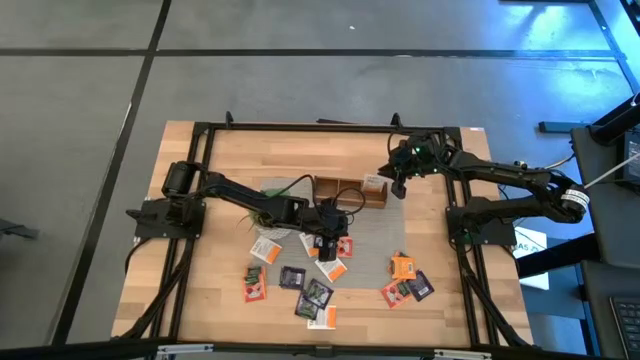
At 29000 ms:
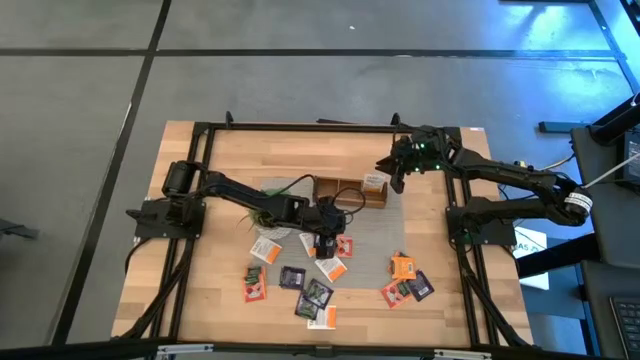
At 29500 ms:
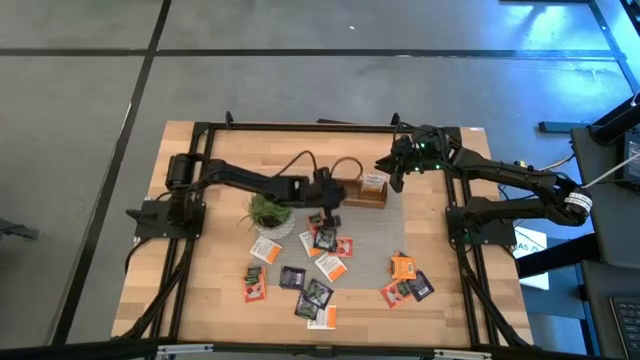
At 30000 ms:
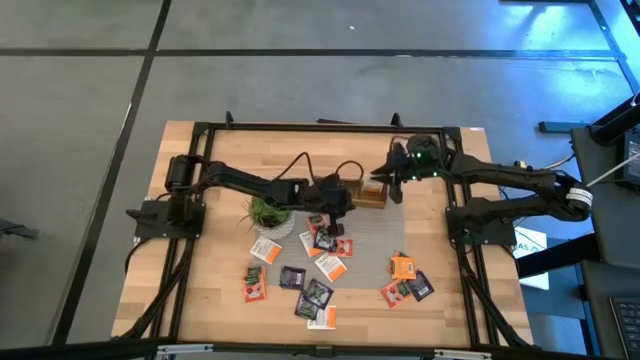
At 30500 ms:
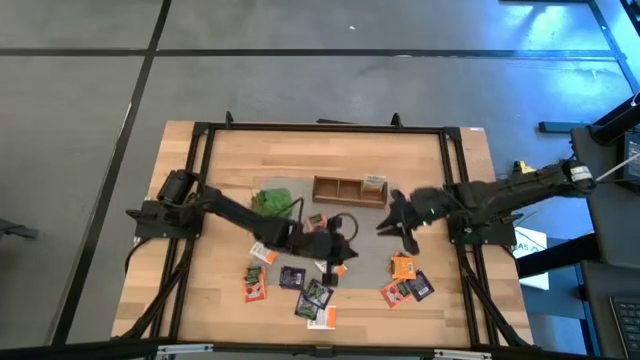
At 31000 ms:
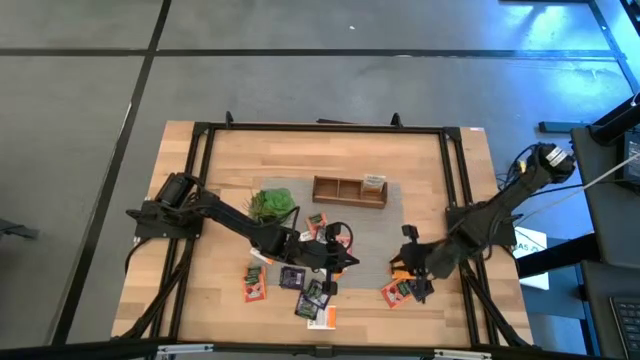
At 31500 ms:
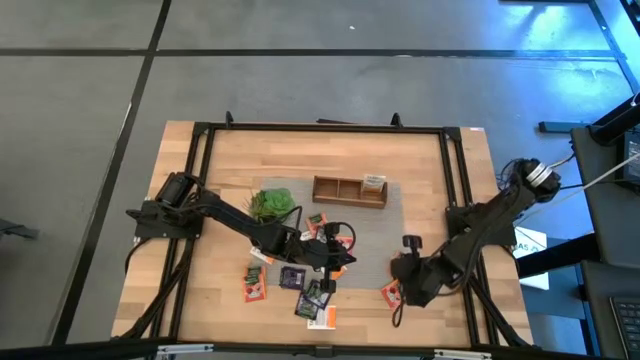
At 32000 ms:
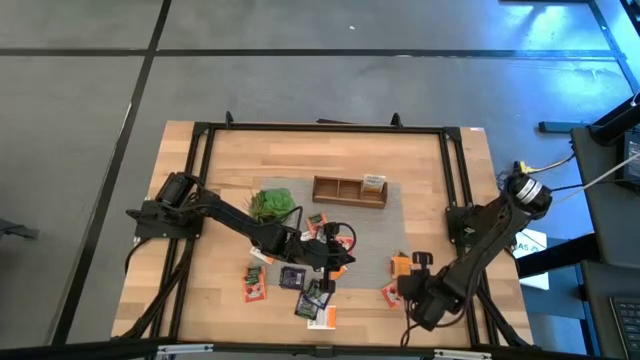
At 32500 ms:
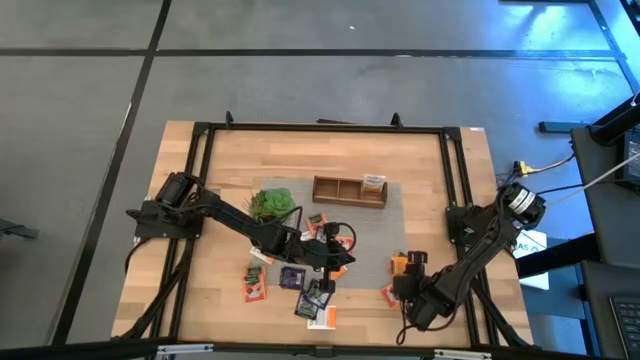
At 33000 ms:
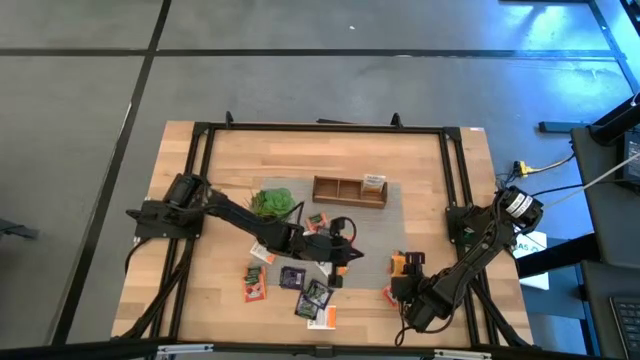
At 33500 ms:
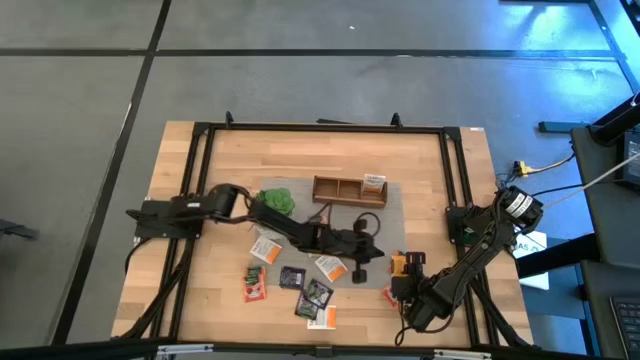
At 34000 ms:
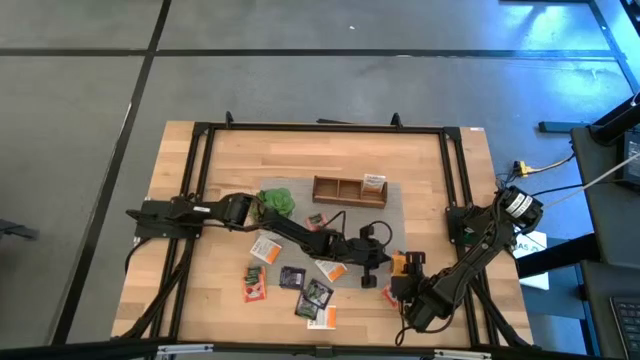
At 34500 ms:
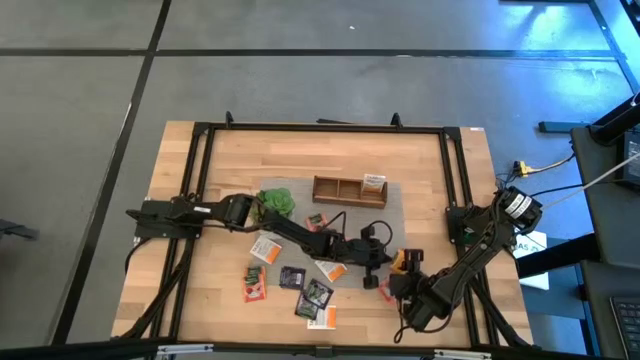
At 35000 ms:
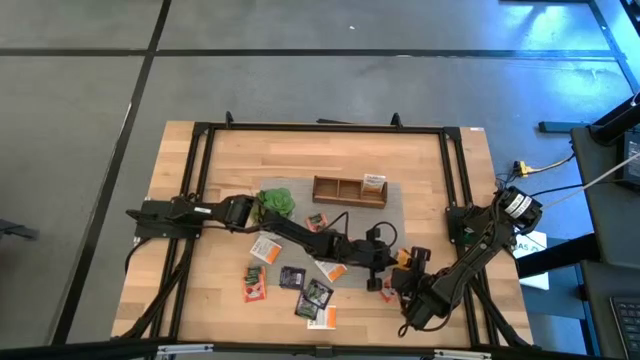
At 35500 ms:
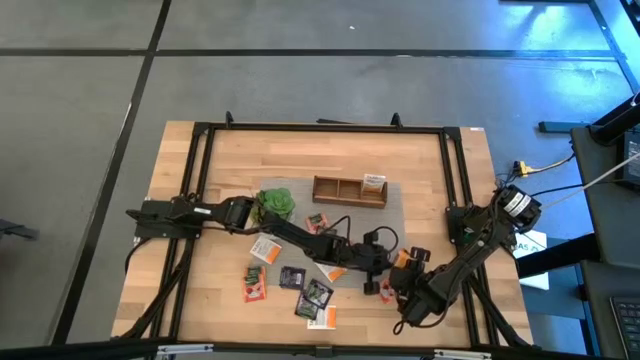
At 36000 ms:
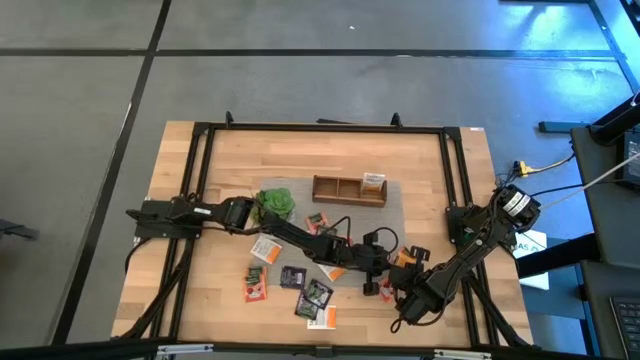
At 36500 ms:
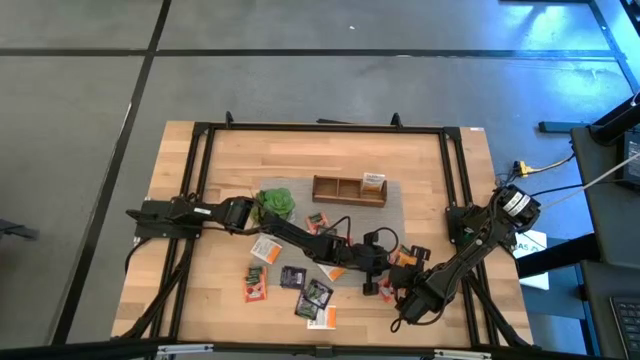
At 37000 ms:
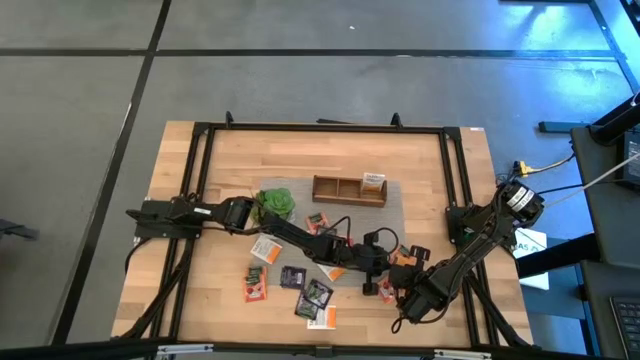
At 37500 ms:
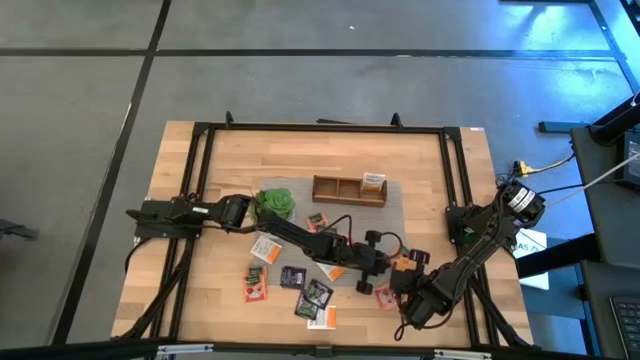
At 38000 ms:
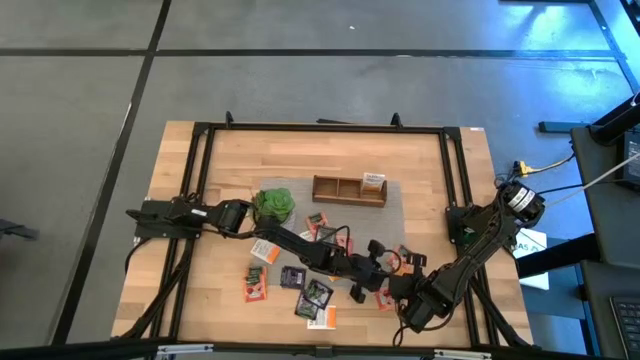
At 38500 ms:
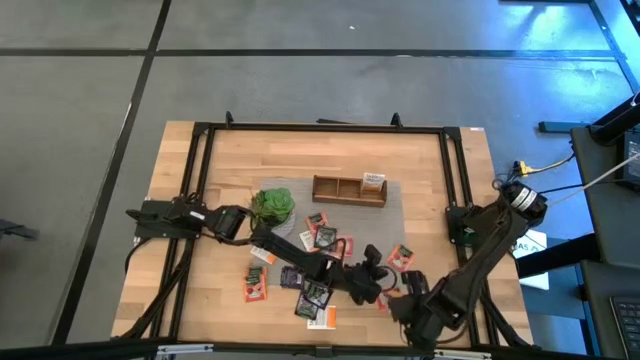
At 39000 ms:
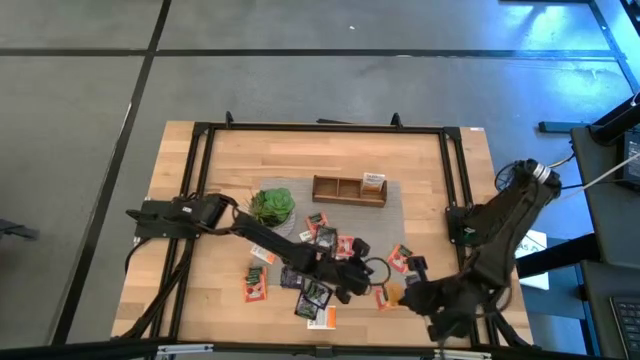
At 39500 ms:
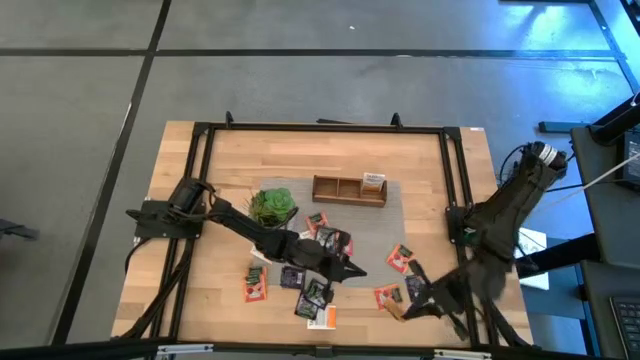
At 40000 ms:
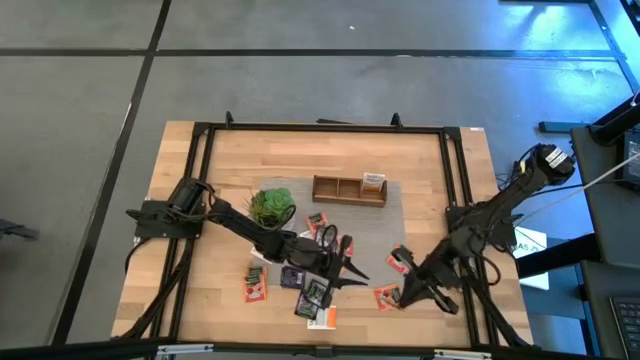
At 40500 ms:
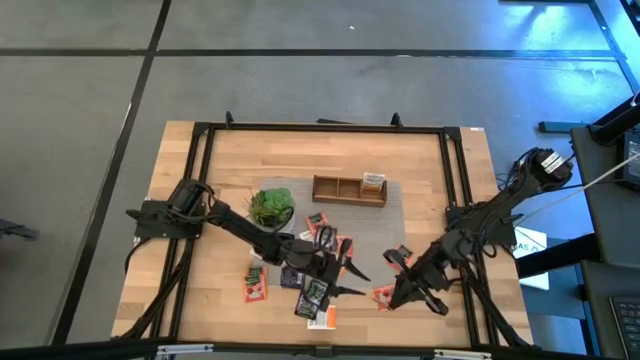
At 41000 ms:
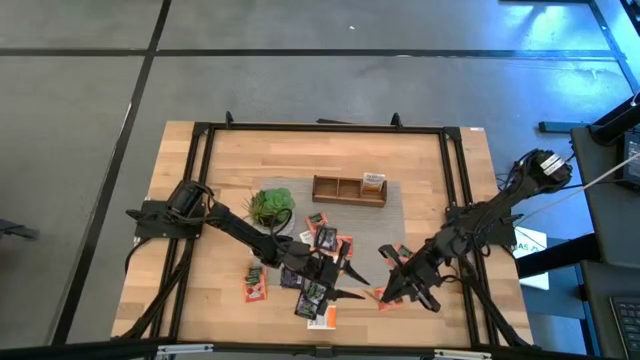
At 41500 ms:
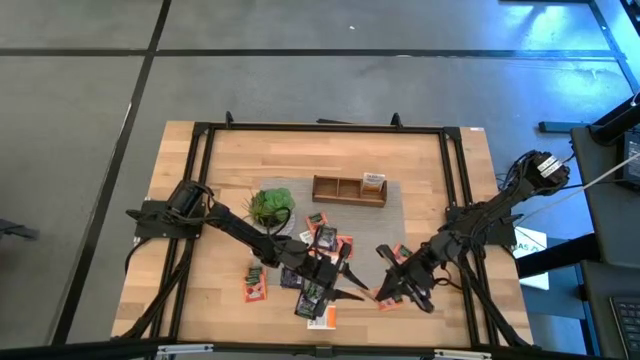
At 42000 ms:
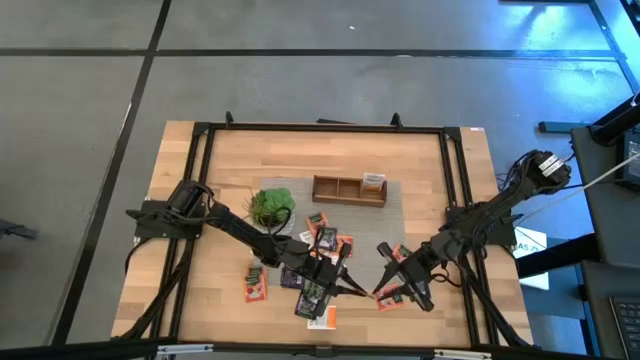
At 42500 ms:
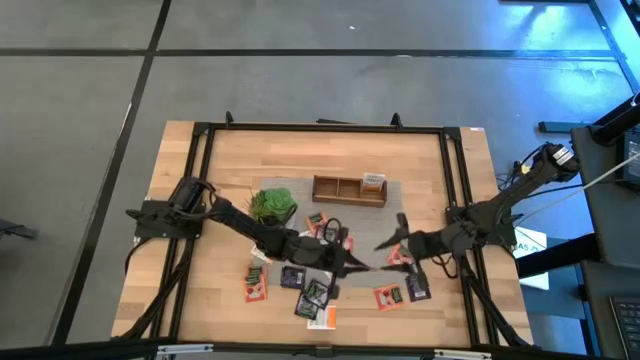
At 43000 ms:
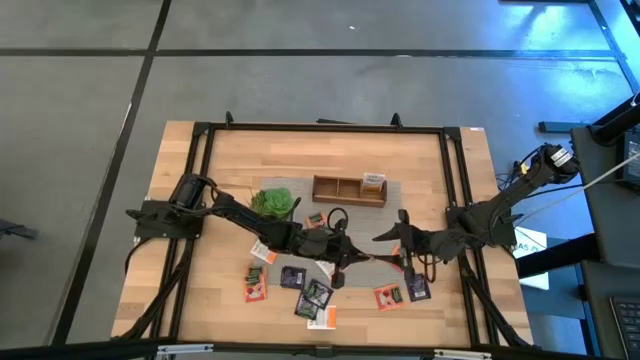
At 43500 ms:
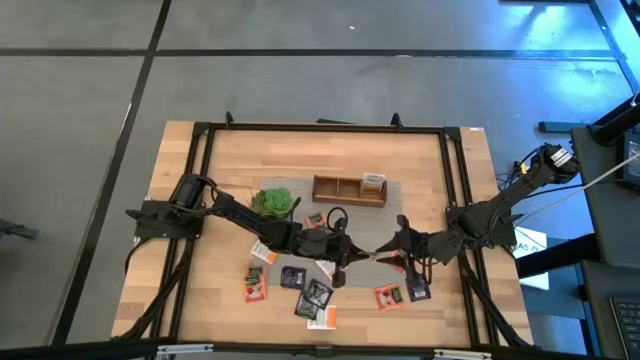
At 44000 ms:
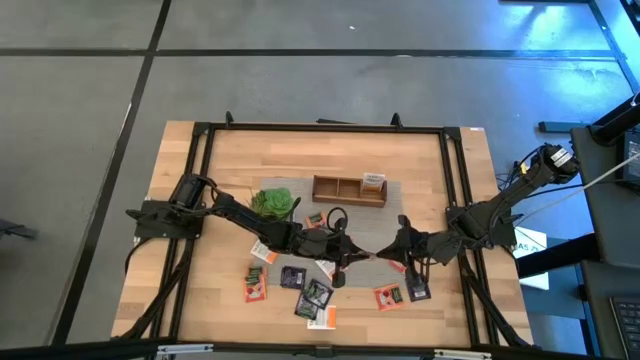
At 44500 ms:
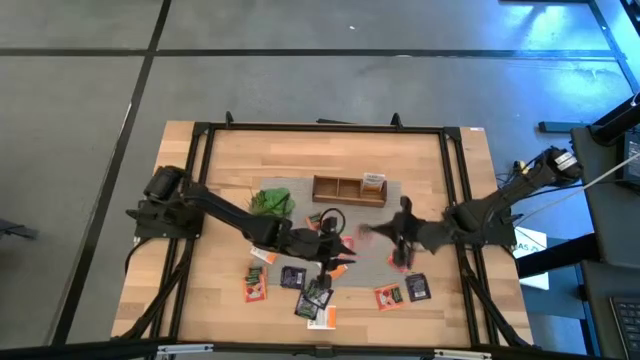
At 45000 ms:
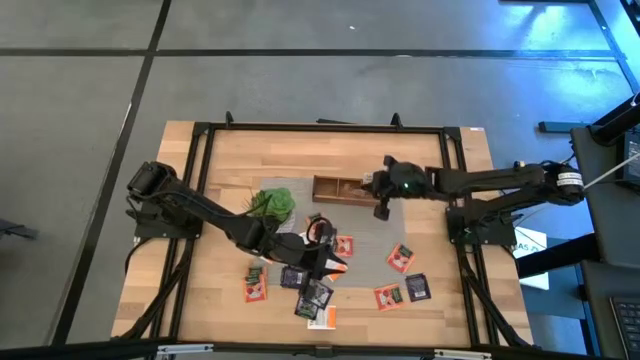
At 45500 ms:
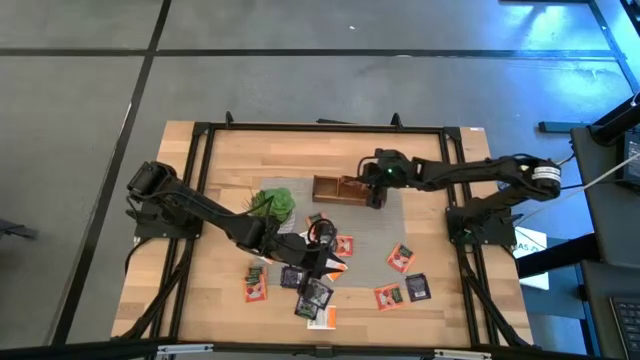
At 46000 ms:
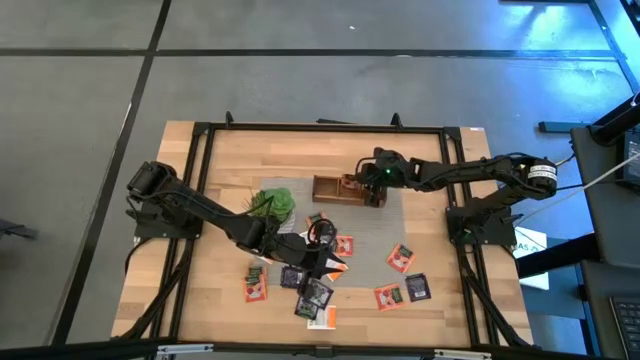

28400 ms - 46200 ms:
Task: Pick & Place Tea
Put the orange tea bag into the middle section of the wooden organizer

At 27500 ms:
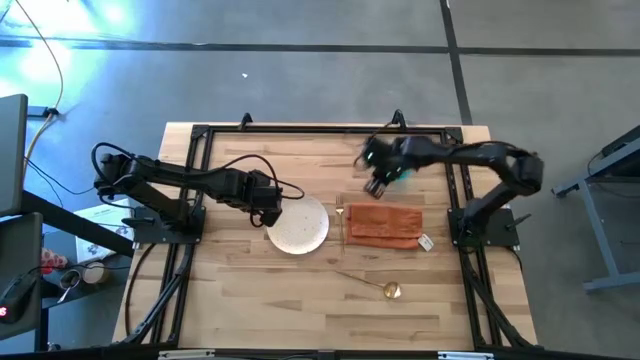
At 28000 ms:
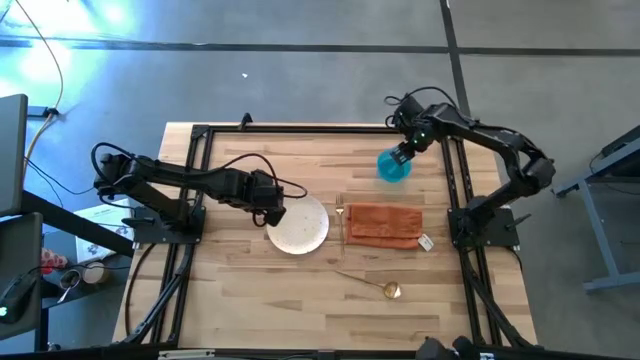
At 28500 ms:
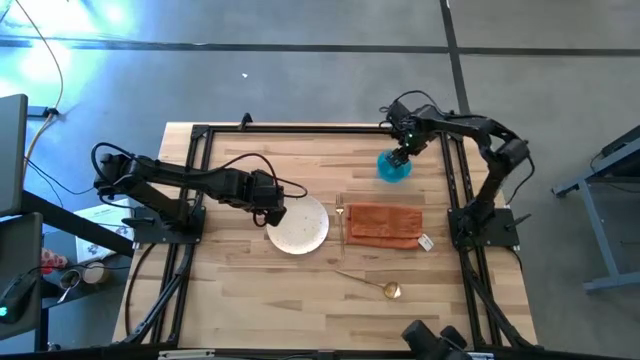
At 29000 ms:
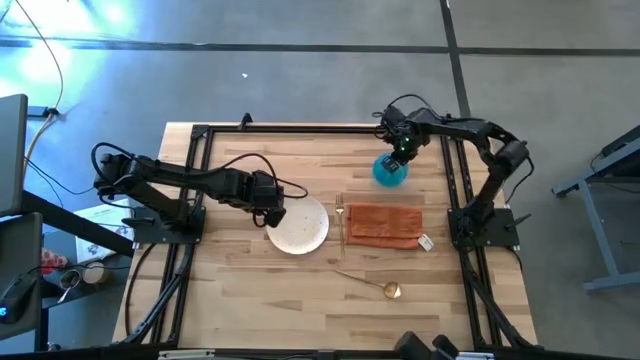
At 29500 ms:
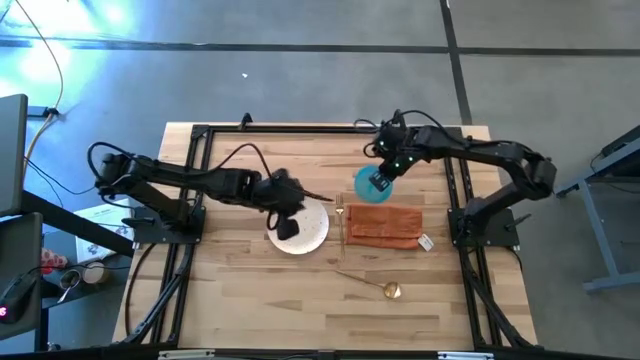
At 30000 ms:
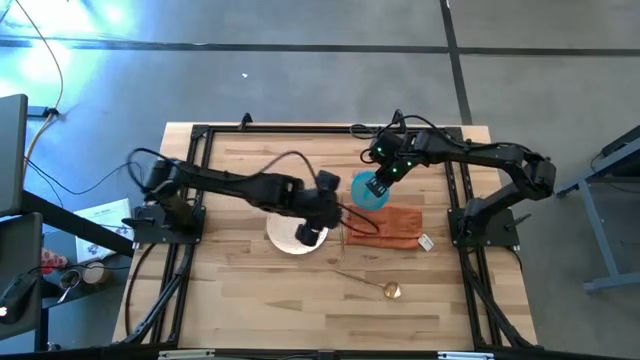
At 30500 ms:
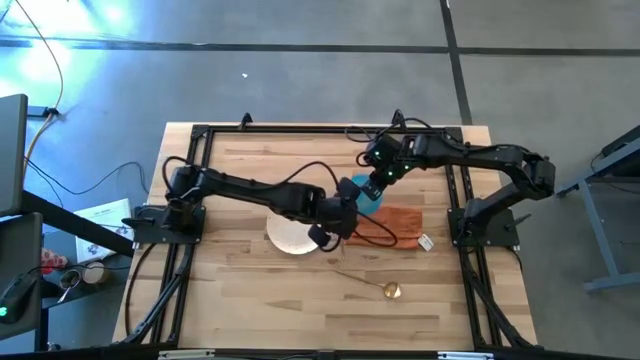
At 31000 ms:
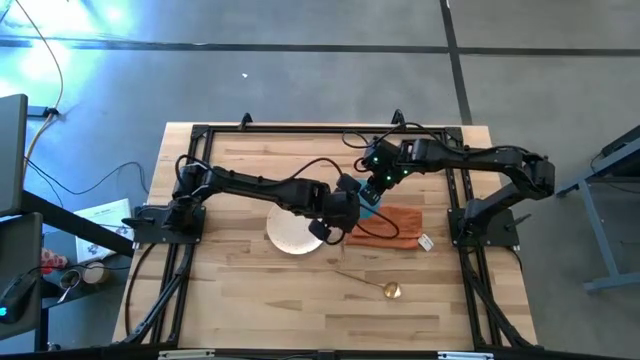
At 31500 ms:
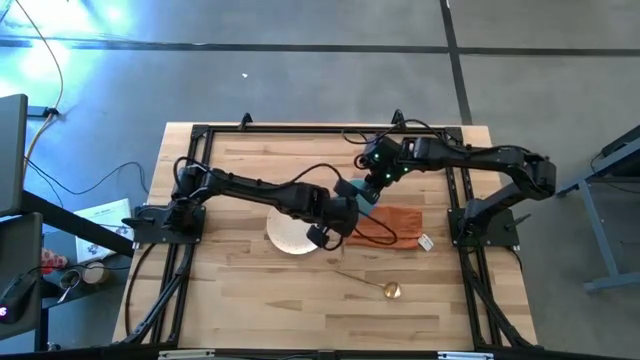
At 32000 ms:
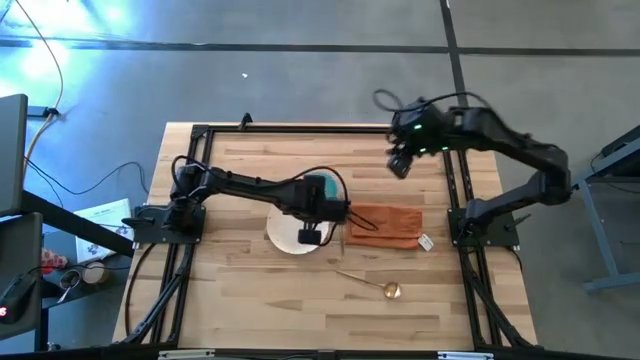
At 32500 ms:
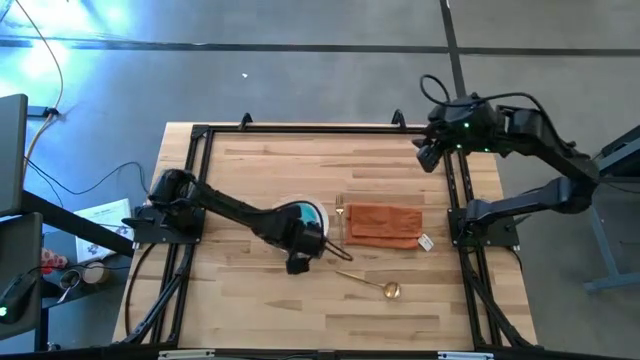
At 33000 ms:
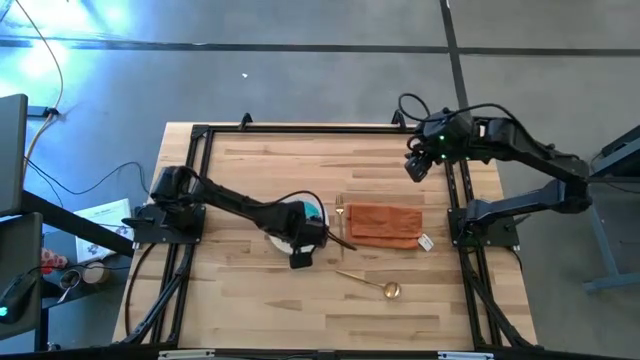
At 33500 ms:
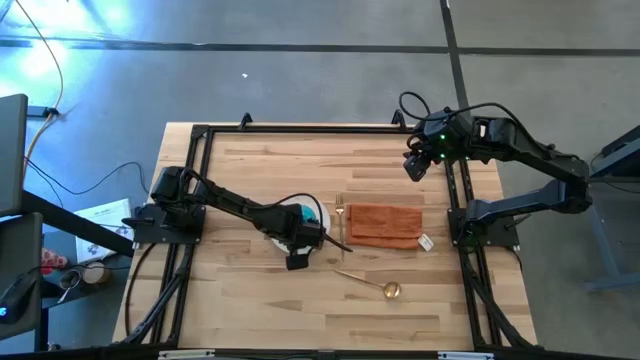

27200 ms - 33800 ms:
Task: Set table place
Put the blue bowl on top of the white plate
